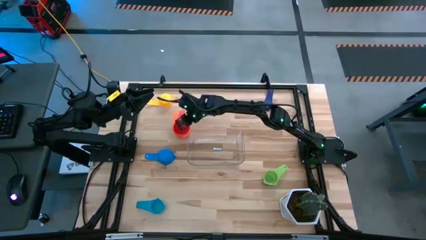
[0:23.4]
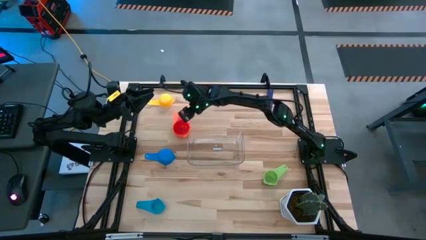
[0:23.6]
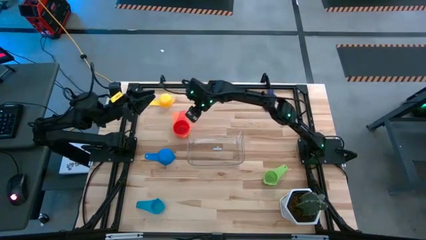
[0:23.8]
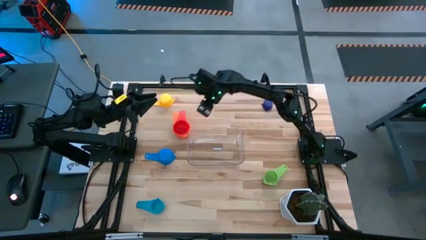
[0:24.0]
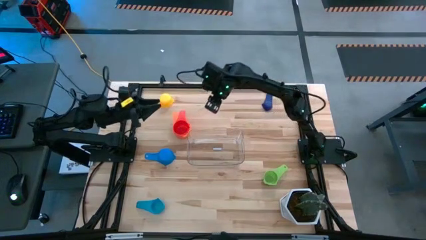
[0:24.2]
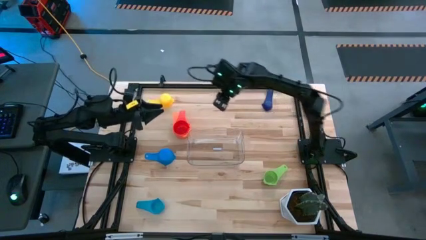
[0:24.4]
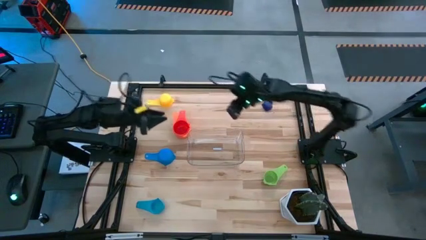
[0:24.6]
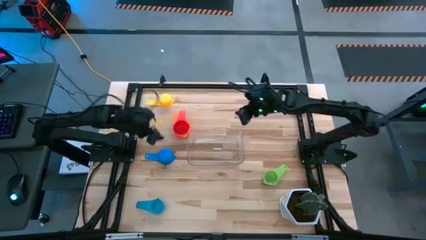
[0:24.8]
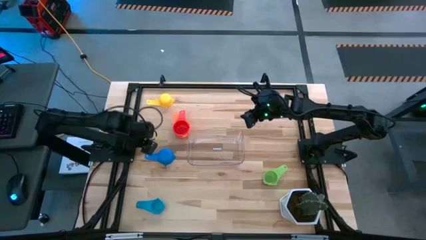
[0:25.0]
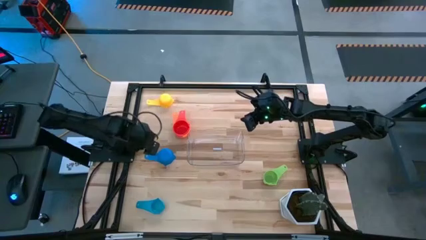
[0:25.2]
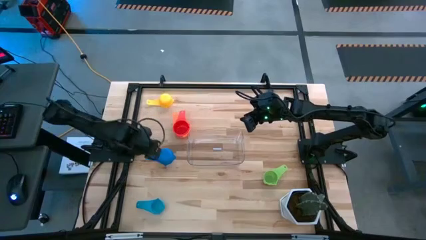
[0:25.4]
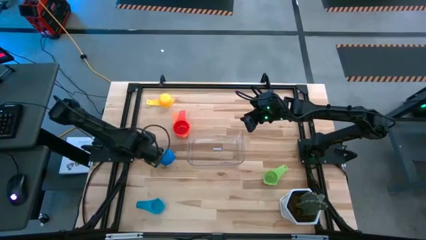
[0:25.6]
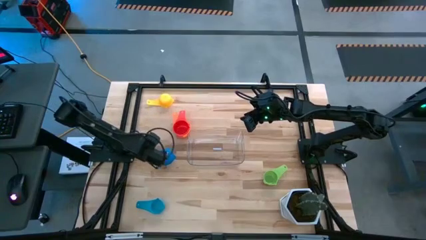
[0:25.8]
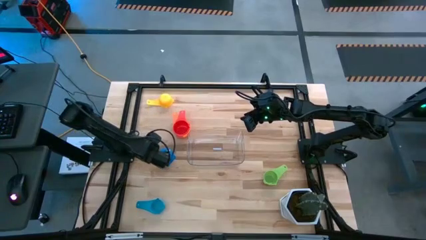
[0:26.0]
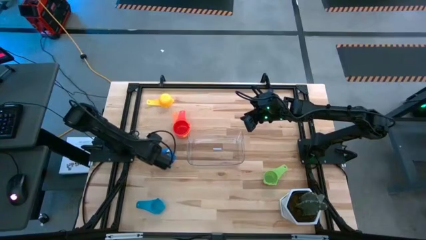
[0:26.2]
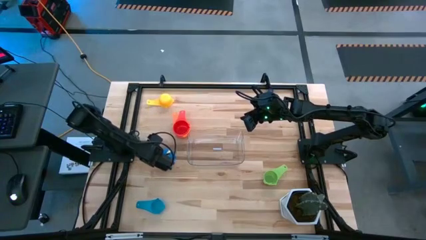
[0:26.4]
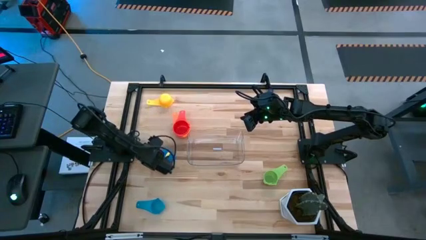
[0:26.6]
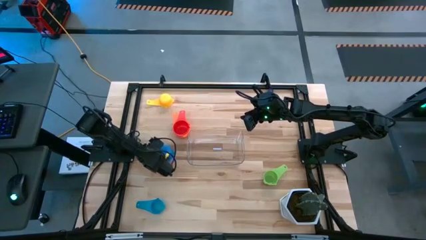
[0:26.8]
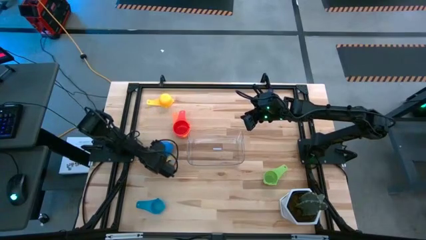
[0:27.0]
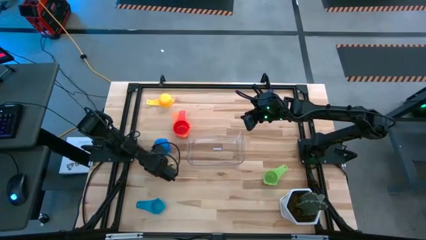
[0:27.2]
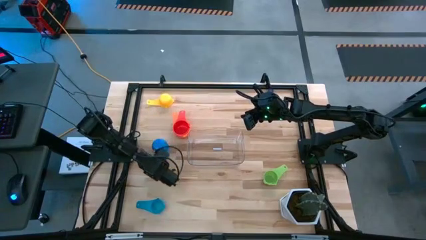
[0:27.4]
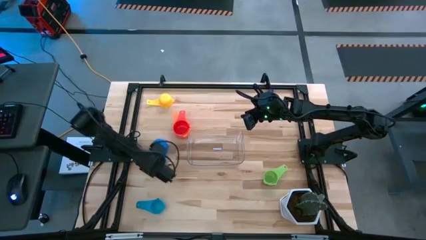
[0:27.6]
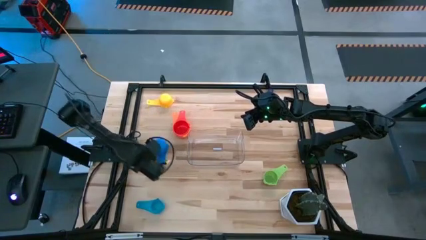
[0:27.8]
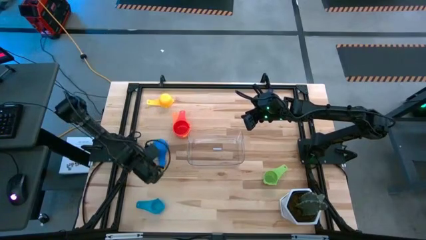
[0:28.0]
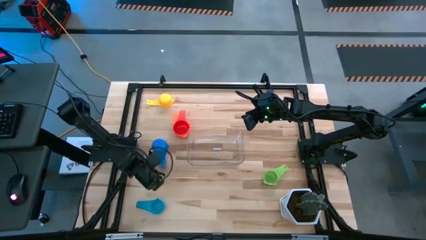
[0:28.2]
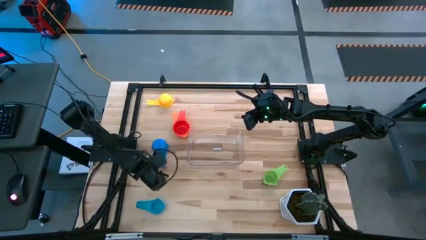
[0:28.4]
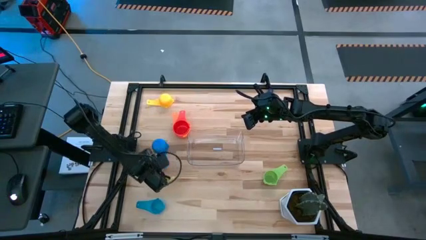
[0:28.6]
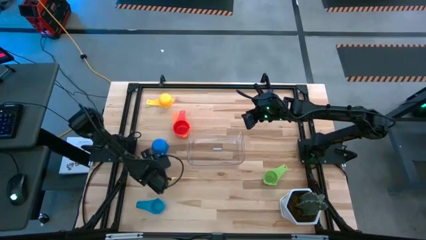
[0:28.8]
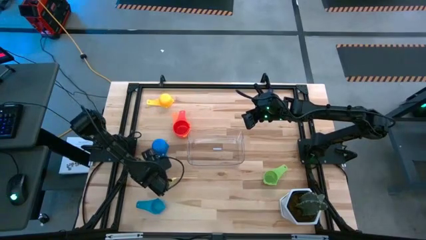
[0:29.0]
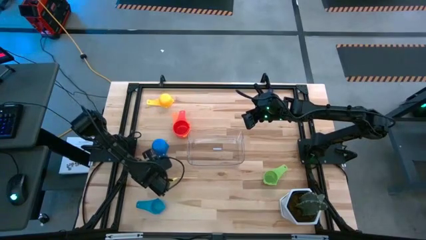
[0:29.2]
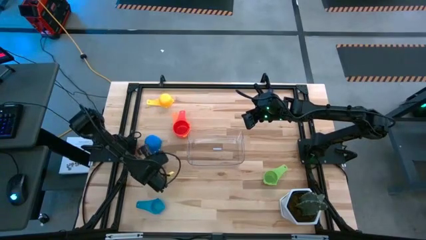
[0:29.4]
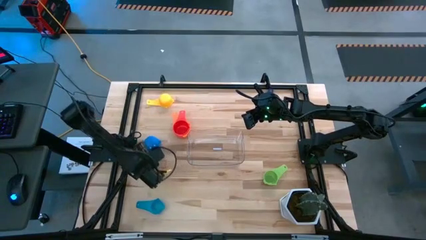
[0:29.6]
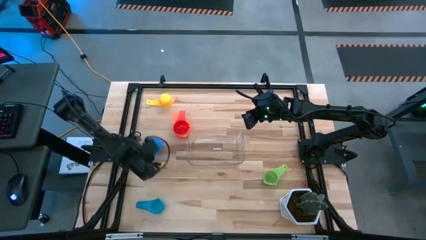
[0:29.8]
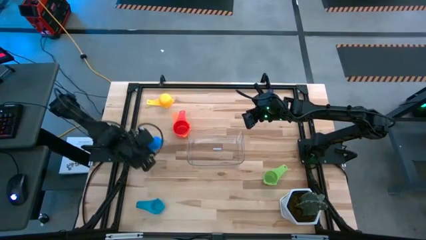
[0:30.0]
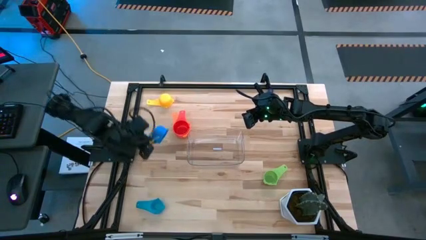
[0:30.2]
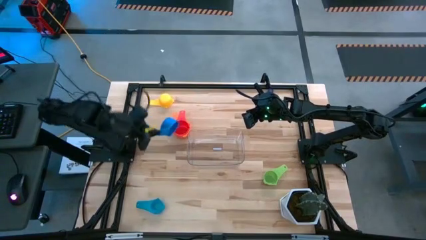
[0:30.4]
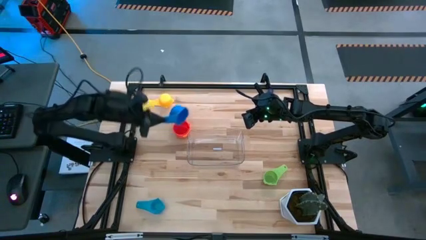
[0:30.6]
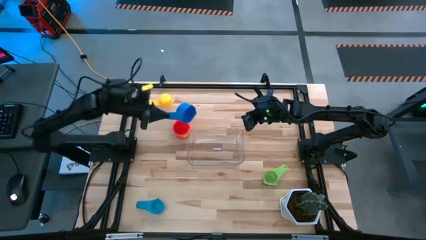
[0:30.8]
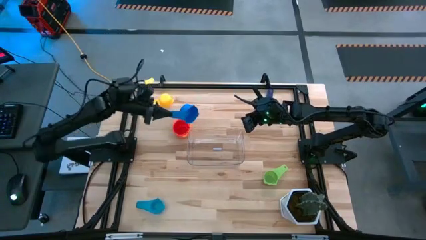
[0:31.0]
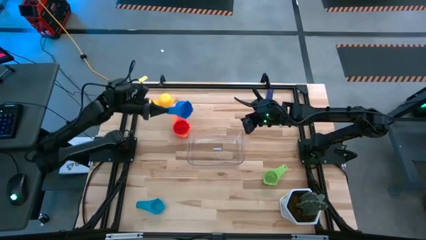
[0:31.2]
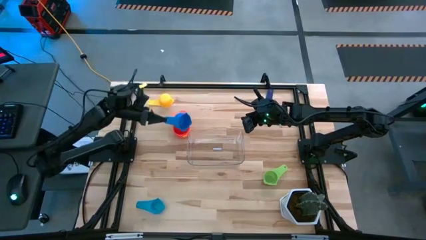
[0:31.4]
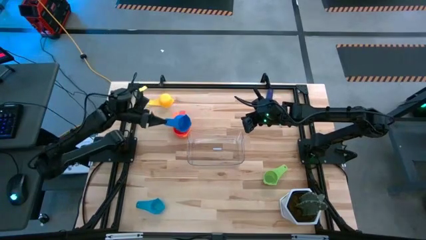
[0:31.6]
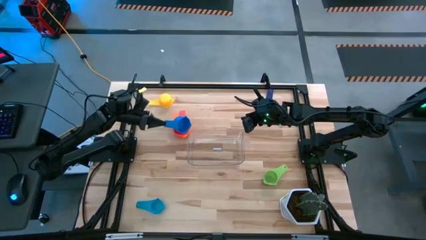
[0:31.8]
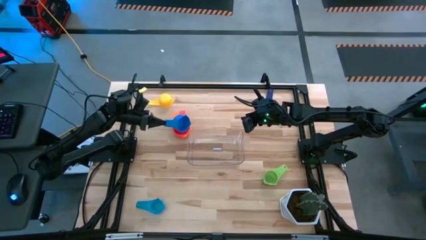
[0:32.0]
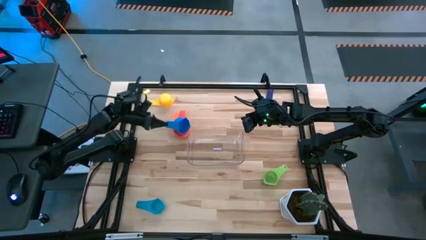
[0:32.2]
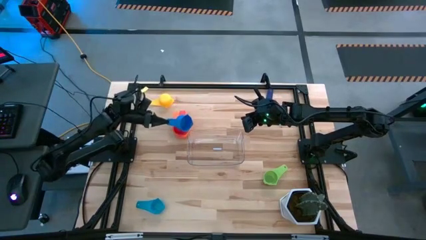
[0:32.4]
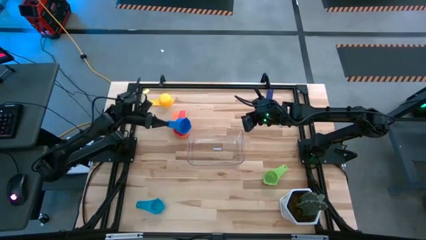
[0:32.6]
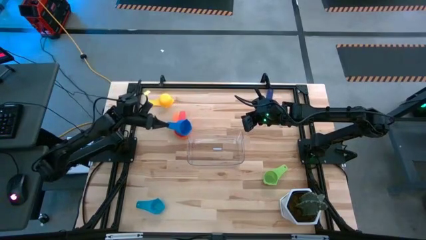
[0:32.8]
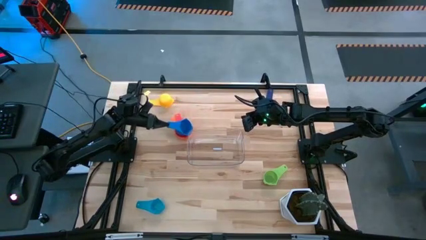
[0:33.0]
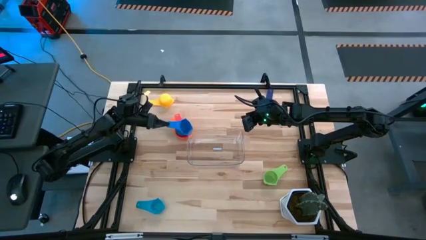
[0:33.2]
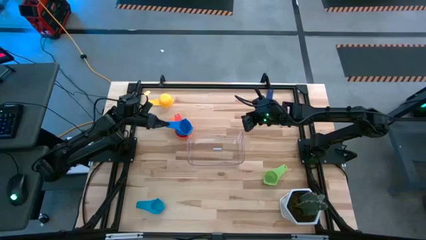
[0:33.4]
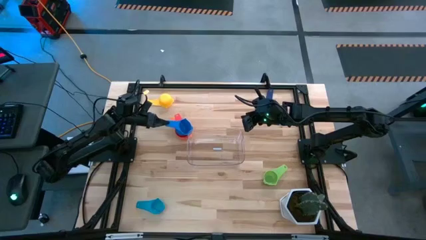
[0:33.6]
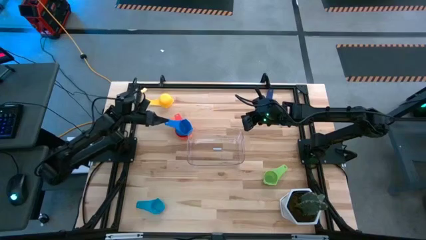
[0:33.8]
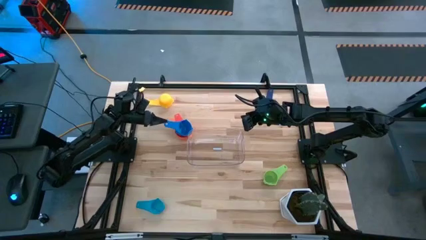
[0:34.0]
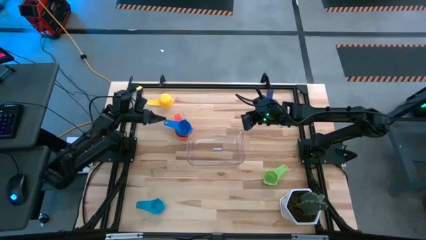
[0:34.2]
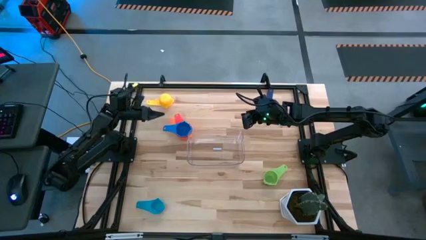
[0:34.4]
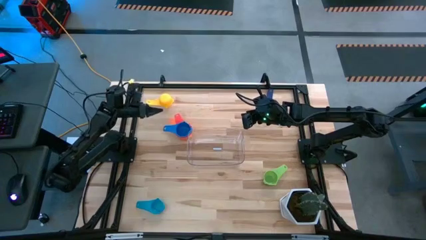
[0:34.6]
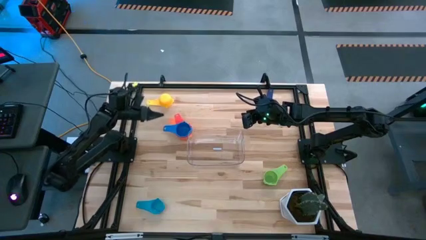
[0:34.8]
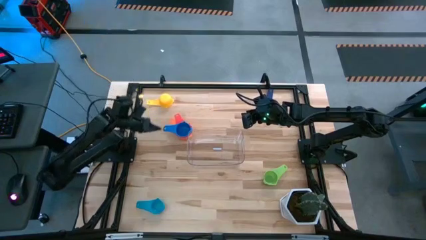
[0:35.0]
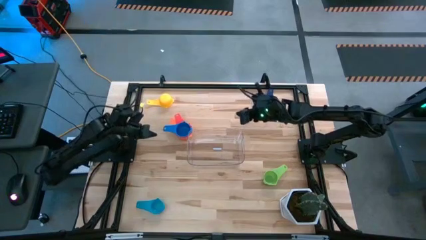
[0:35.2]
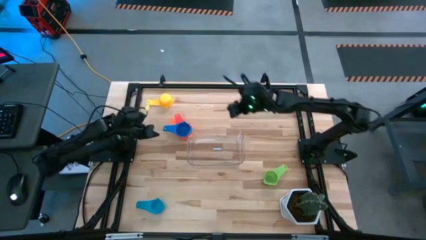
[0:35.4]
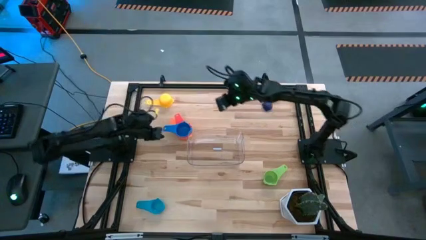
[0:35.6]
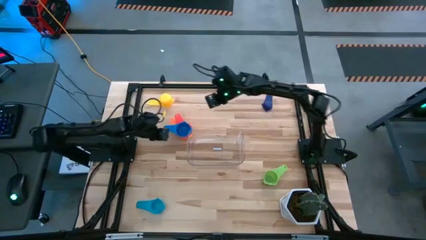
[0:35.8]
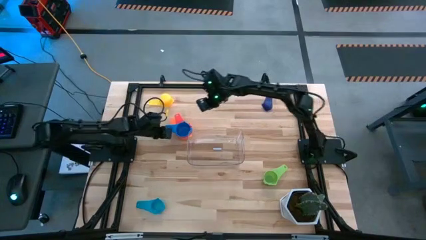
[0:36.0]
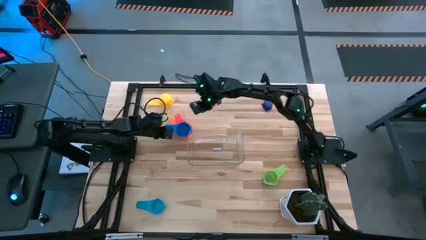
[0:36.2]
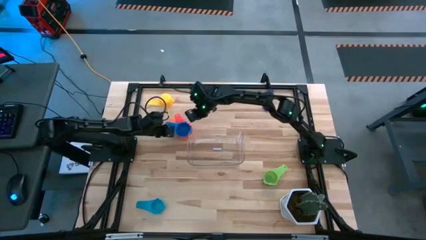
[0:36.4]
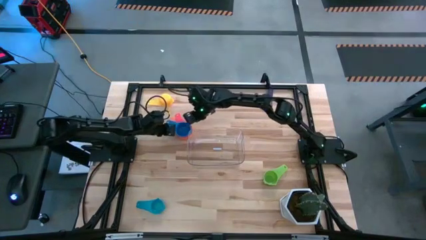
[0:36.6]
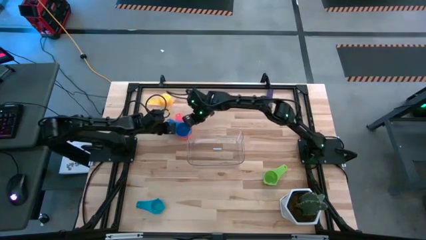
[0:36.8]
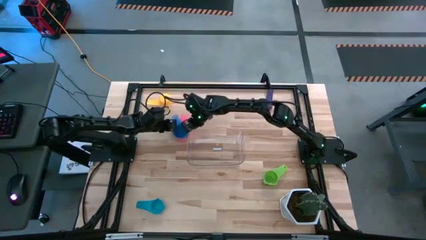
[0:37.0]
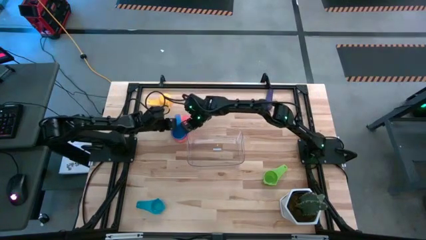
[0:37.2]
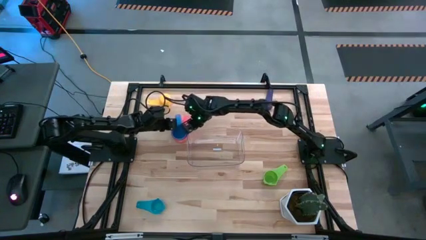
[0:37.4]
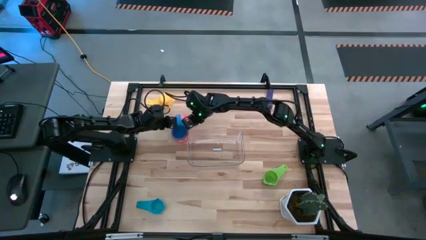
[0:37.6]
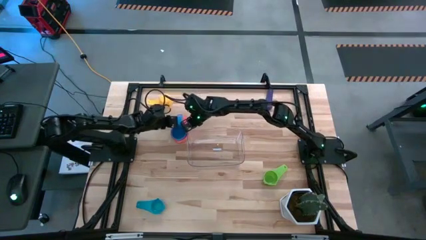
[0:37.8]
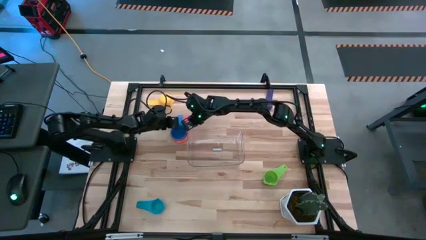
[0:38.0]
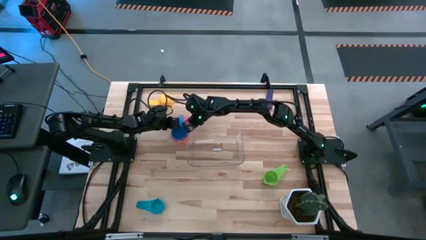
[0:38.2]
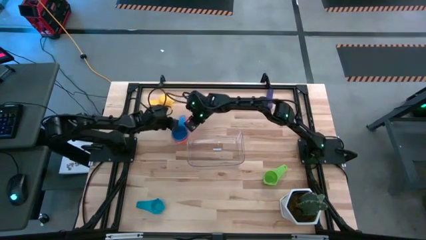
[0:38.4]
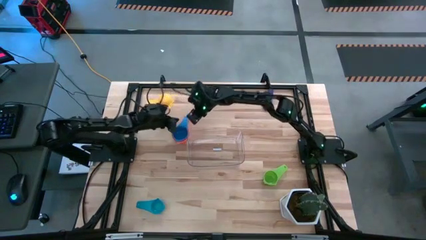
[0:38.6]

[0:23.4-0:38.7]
Task: Nest measuring cups in basket
Stack the blue measuring cup on top of the red measuring cup

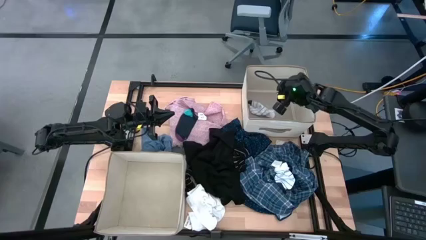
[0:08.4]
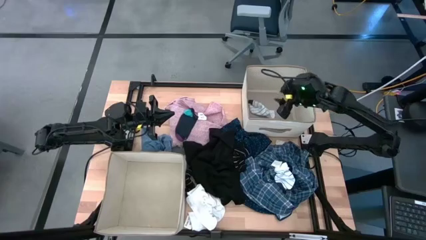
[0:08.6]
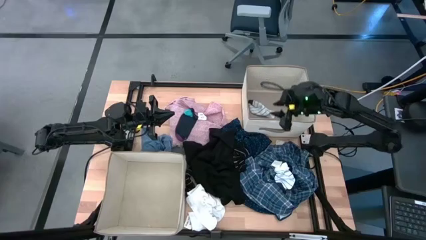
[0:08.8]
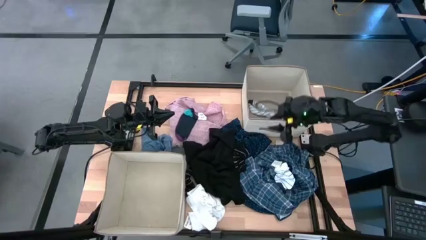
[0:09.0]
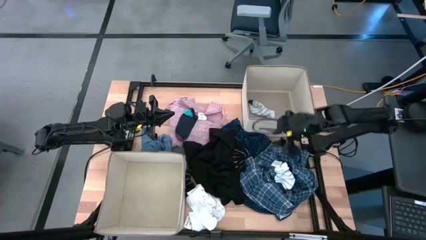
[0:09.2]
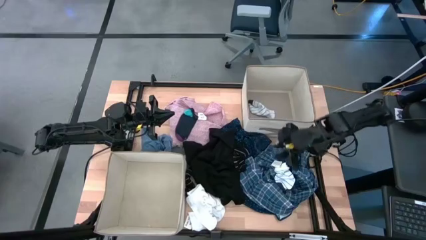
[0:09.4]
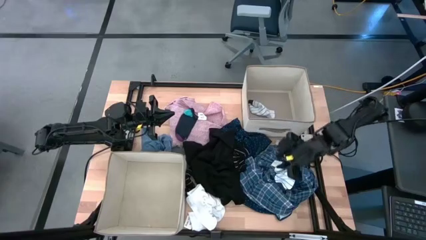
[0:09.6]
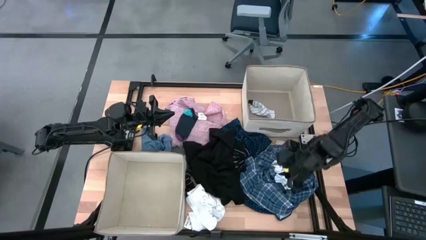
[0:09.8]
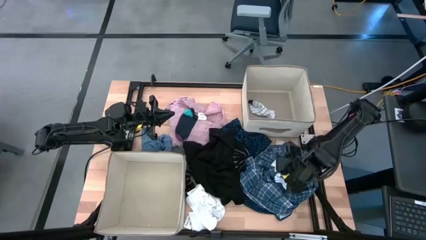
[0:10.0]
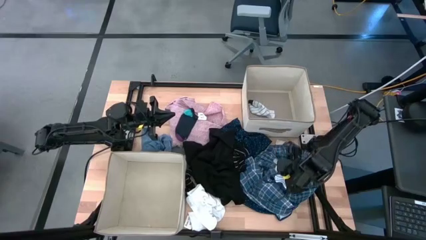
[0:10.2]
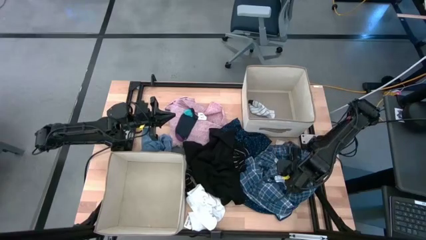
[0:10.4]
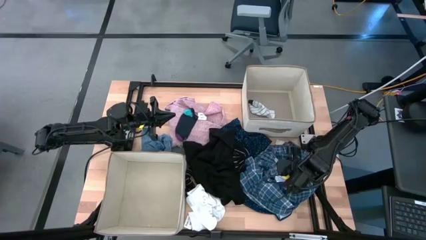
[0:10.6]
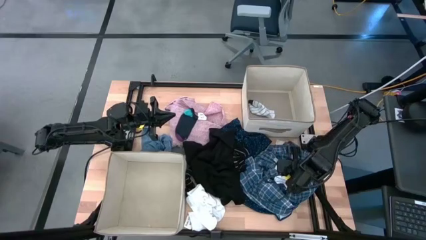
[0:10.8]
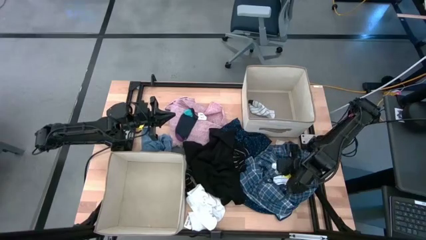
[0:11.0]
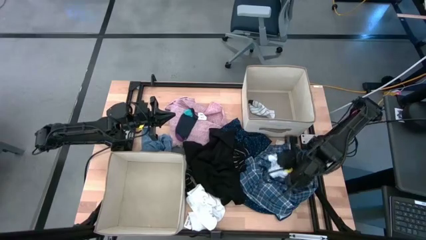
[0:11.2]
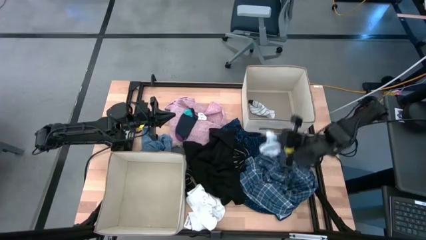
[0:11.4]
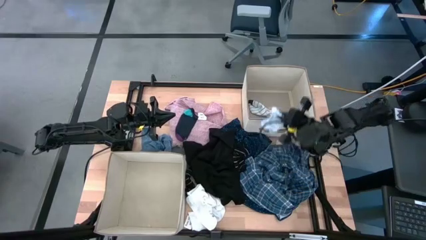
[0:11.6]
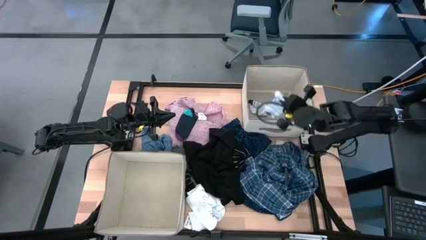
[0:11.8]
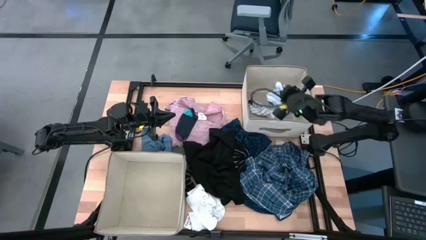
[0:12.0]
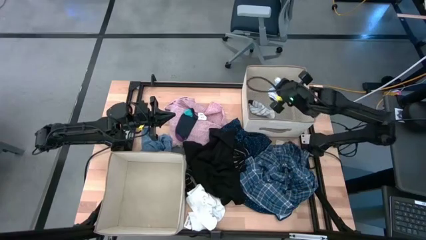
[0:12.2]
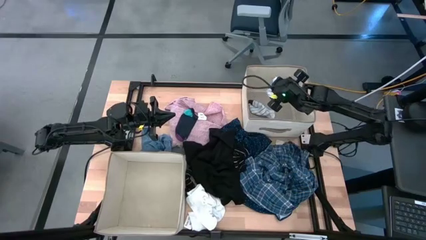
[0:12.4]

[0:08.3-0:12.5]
Task: Sort clothes
Put the white striped sock into the top white laundry organizer
